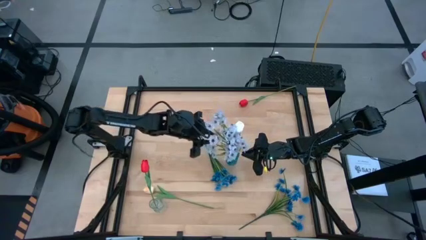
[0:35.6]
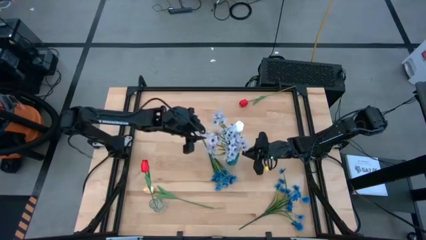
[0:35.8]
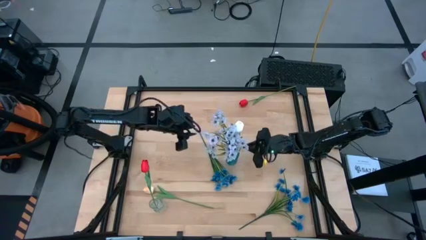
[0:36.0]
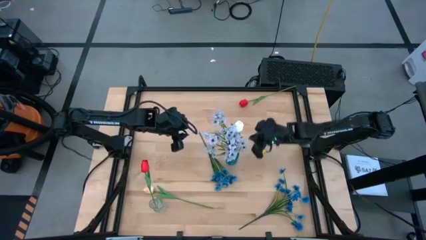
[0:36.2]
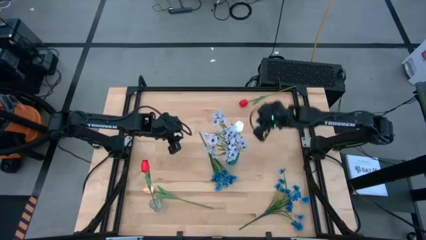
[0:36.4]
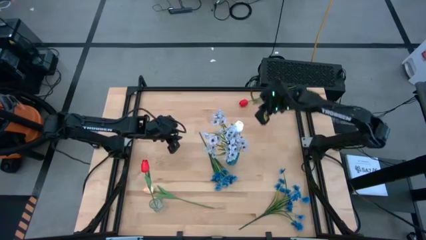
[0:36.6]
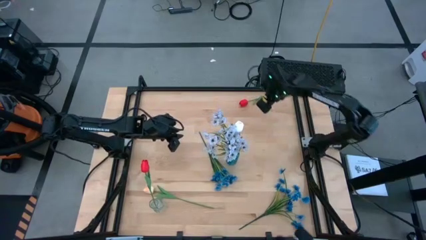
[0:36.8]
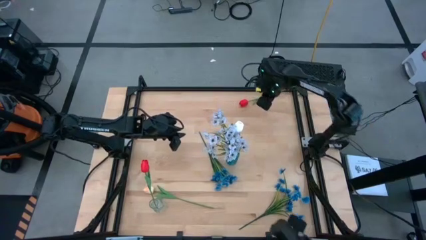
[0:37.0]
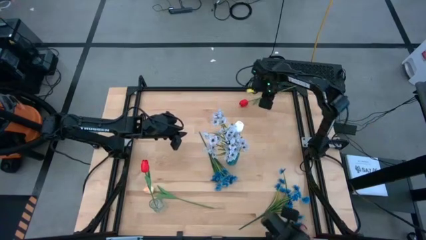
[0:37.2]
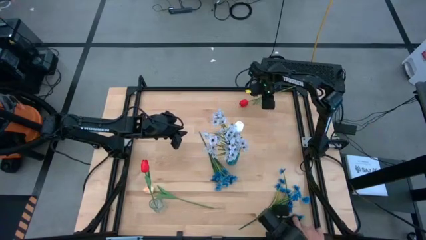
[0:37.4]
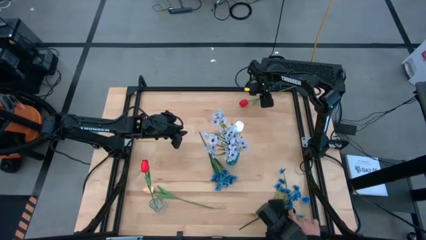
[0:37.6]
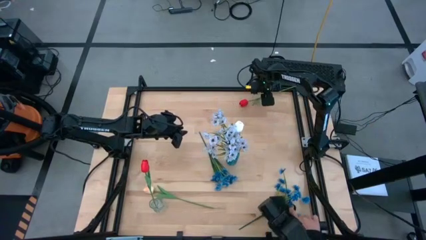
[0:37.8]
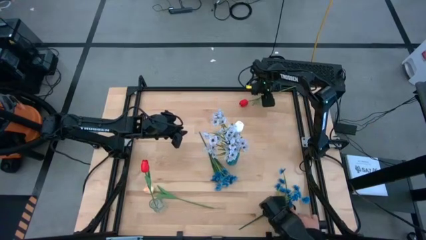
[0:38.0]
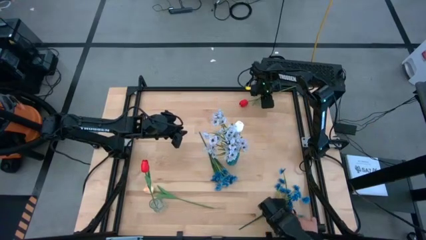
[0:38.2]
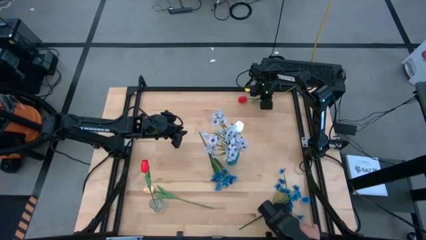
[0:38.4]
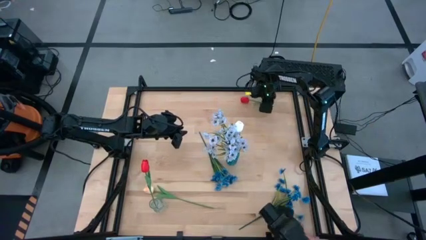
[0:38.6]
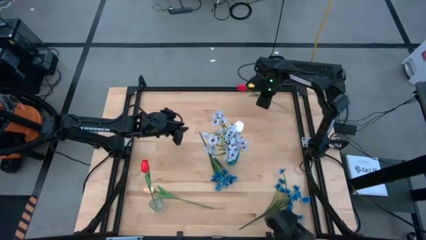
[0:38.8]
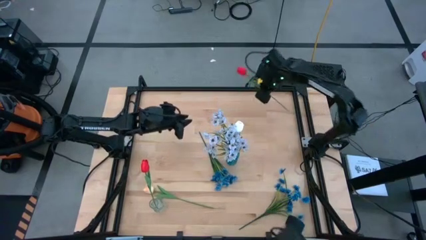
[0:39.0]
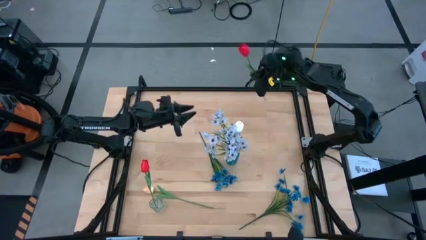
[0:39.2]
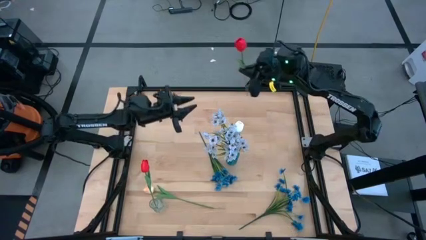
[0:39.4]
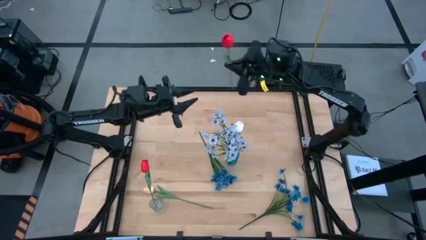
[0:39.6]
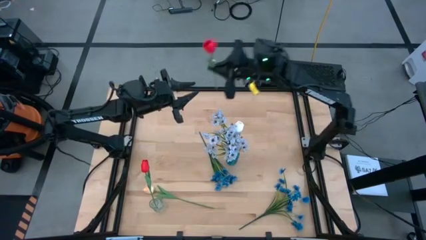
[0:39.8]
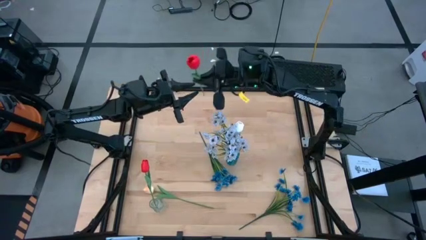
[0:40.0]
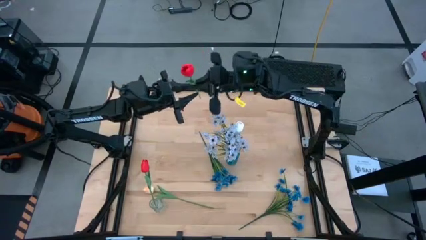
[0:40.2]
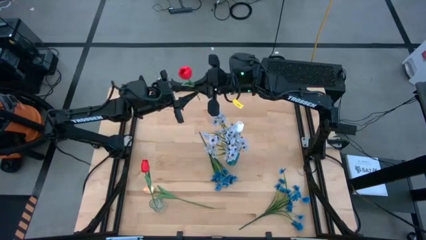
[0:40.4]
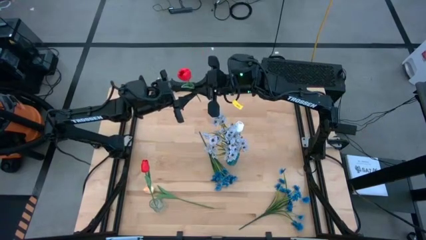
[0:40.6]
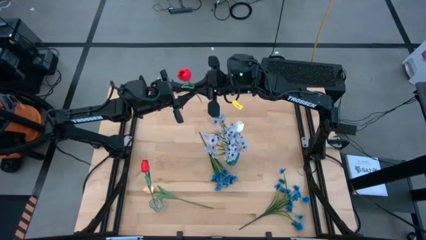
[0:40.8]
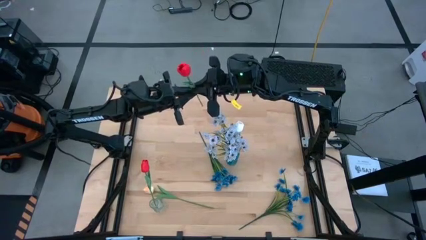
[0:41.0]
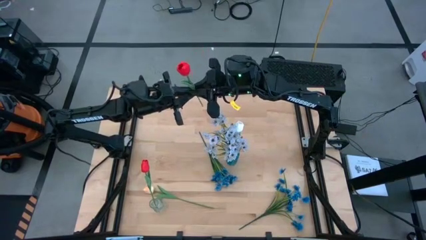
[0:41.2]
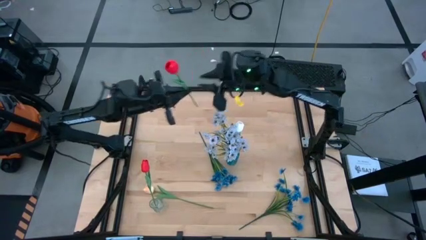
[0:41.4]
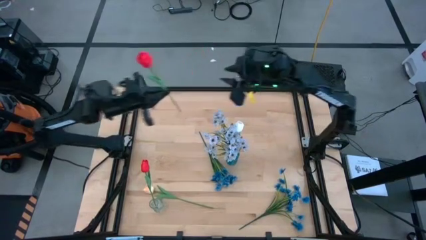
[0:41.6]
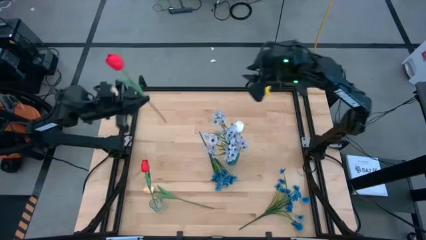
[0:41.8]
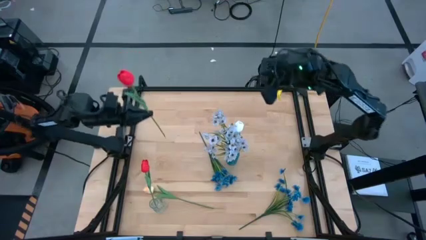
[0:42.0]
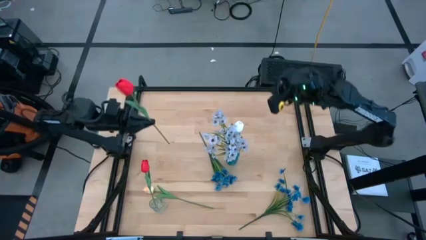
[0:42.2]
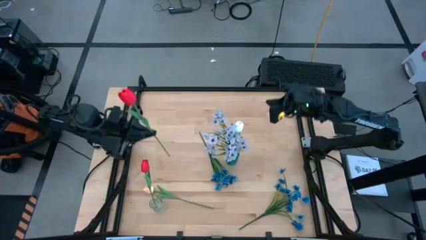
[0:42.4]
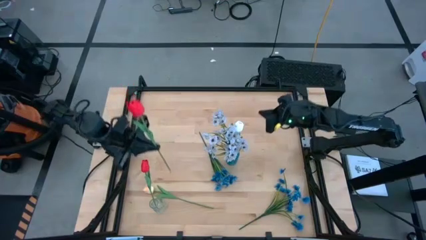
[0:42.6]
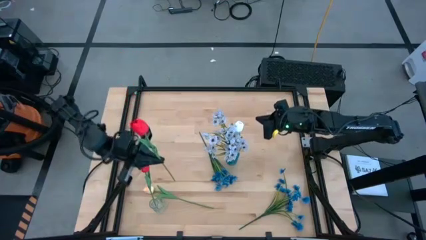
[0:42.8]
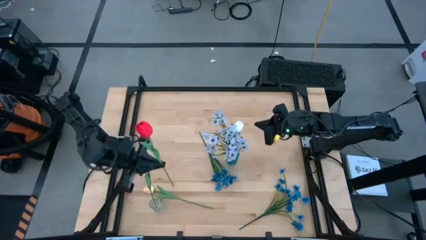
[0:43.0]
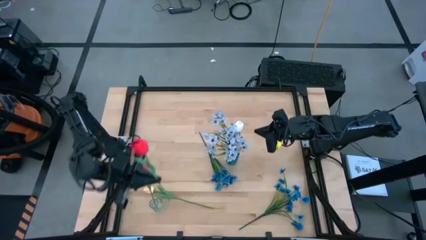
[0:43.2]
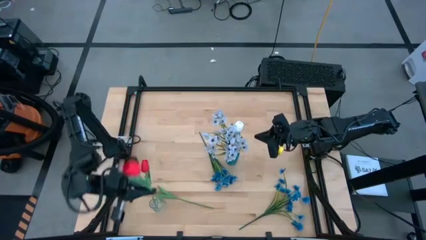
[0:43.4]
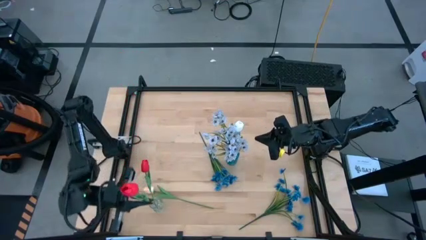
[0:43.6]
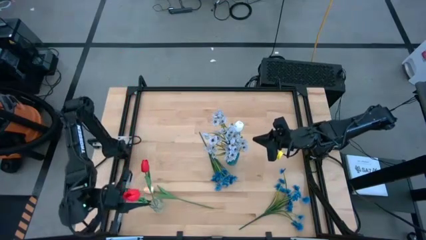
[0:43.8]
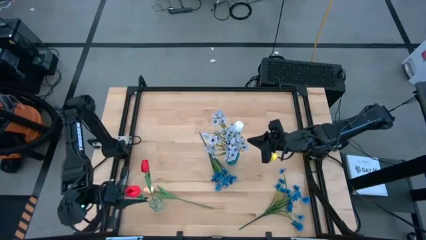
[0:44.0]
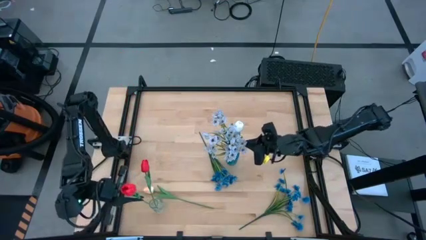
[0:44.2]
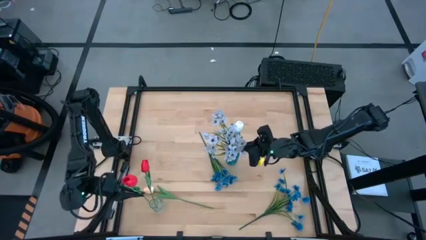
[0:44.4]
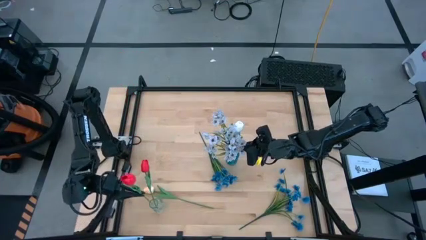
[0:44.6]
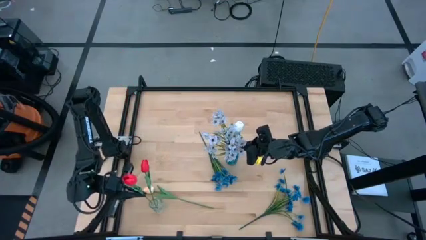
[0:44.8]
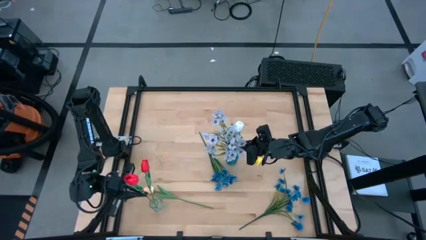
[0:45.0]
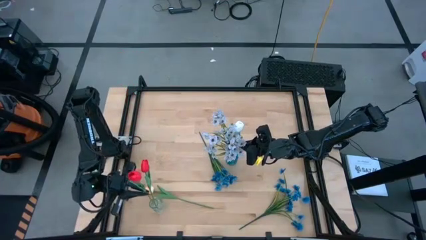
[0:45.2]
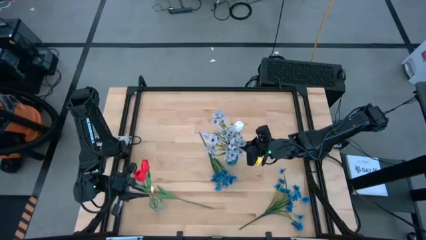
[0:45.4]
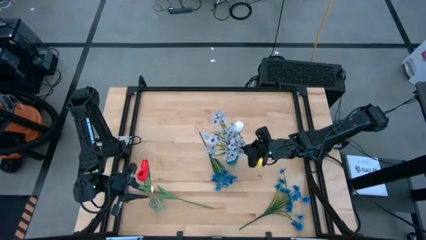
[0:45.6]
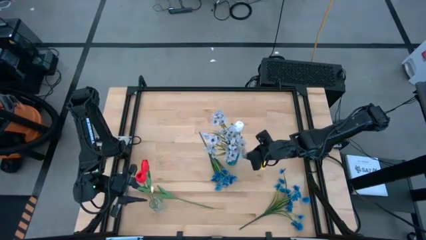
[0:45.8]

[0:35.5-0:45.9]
Task: Sort flowers into vase by color
Put the red flower into the transparent flower vase

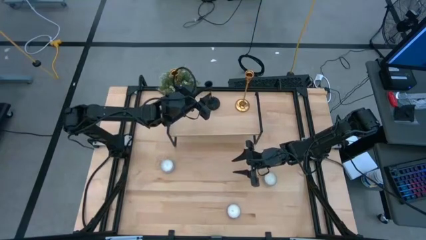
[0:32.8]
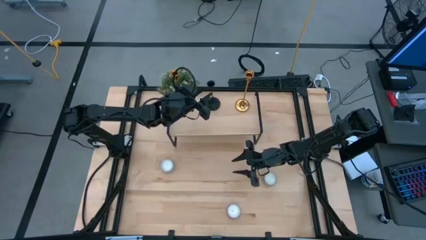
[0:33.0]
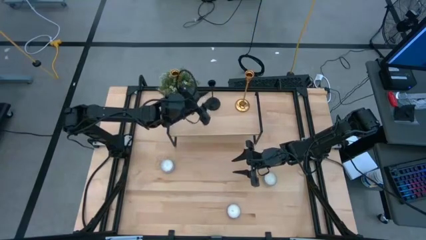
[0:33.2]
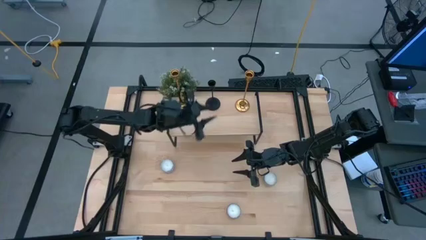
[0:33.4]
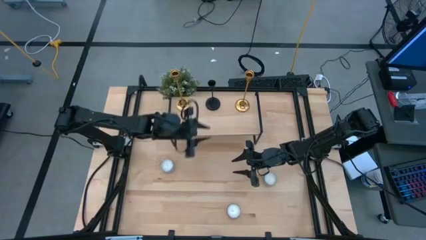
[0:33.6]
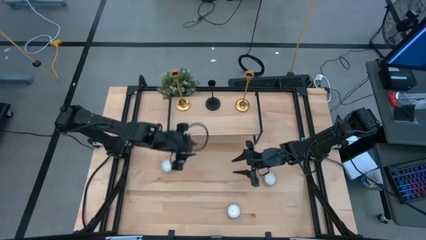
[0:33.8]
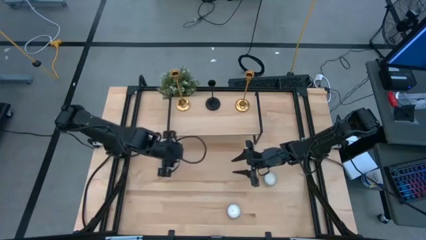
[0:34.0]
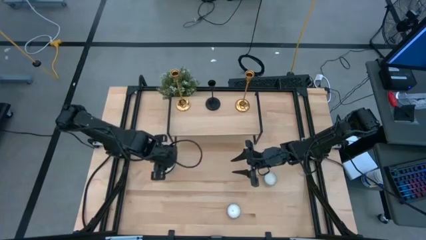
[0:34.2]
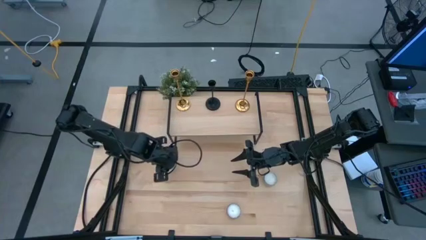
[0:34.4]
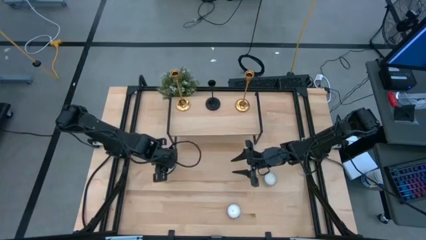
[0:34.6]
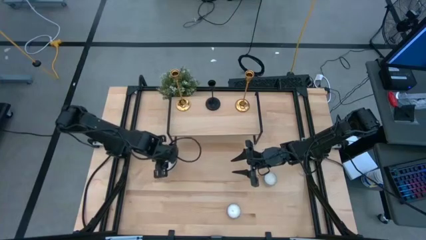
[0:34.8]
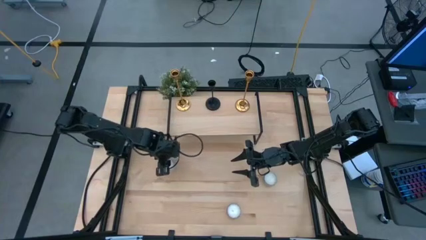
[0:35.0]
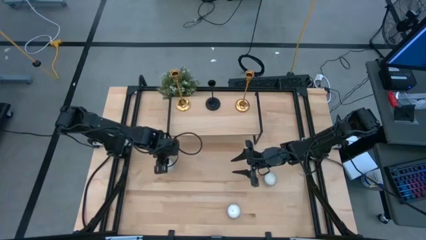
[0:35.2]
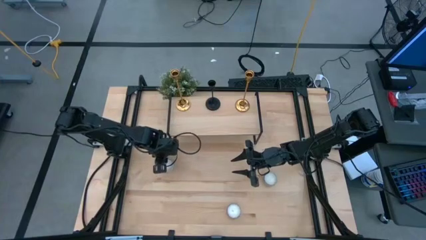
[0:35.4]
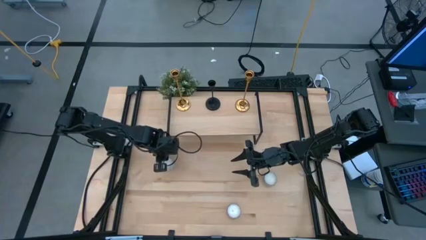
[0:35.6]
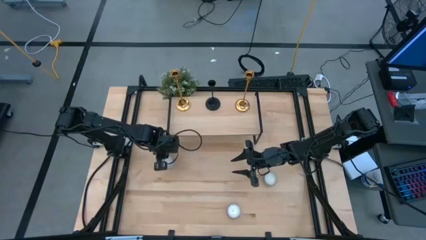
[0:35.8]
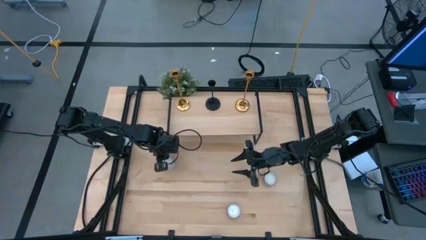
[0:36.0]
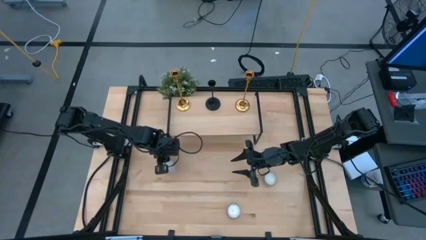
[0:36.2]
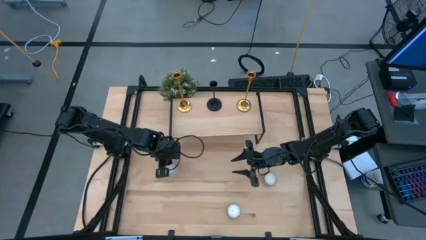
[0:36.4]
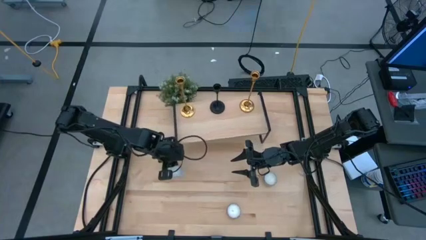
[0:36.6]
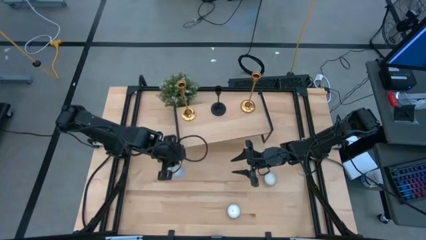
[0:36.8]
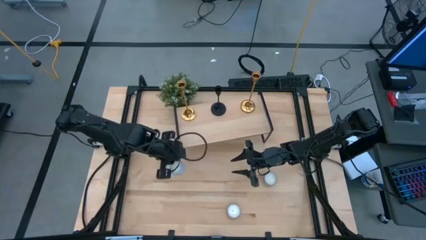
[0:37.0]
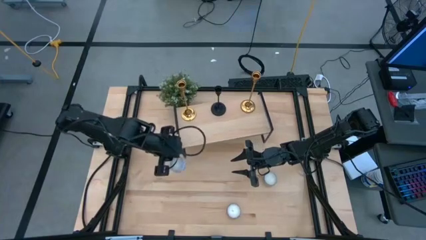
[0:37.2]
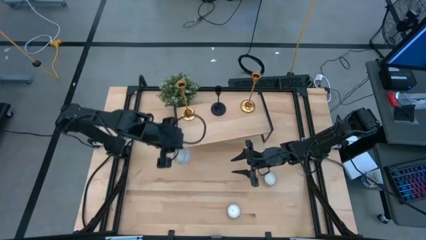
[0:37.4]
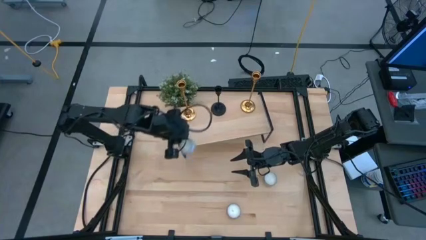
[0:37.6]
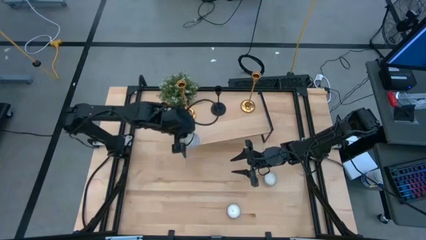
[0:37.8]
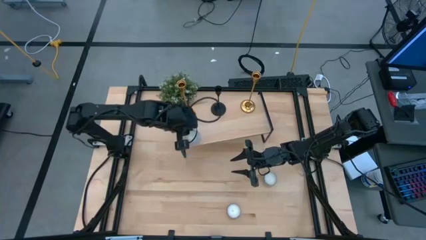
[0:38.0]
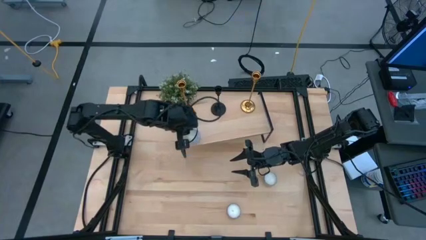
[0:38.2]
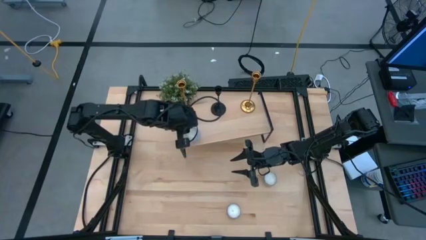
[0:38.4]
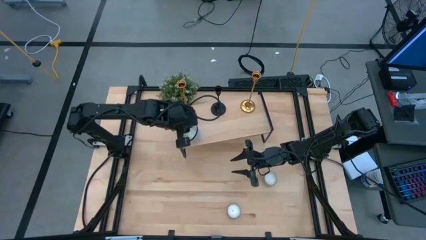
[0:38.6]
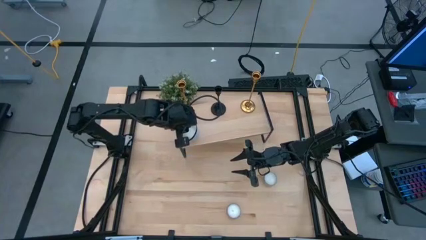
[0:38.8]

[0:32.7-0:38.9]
Task: Pick & Place candle stick holders
Put the red scented candle on the shelf
